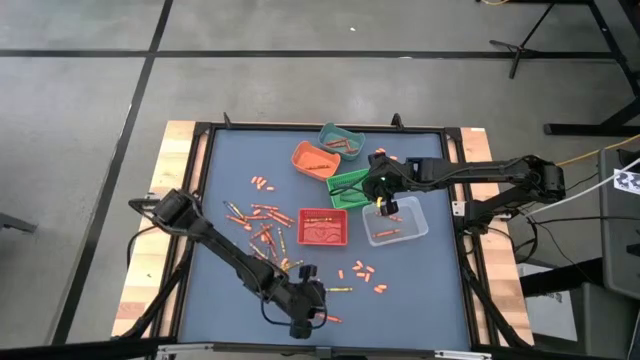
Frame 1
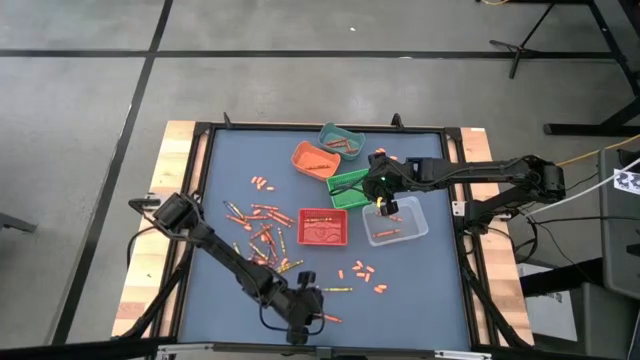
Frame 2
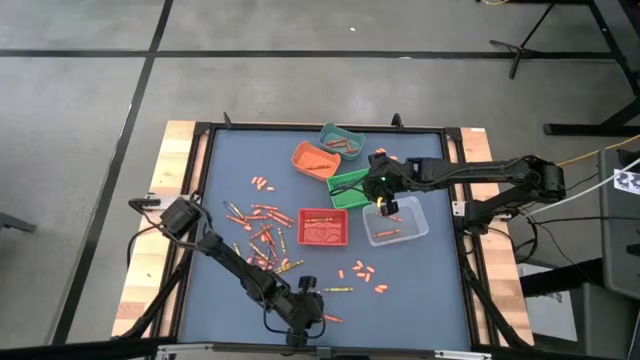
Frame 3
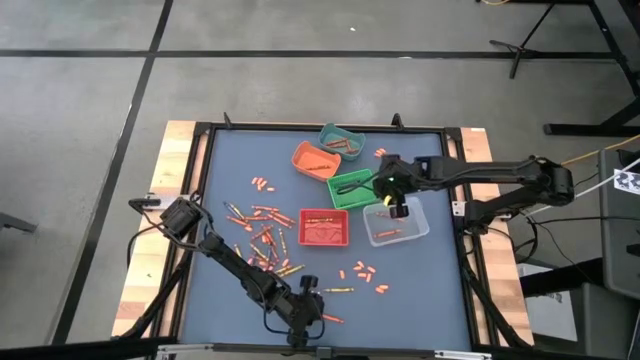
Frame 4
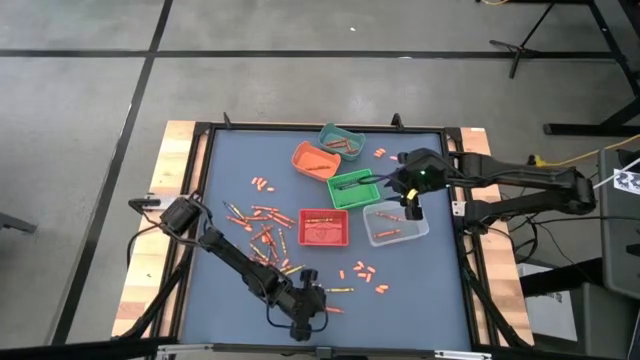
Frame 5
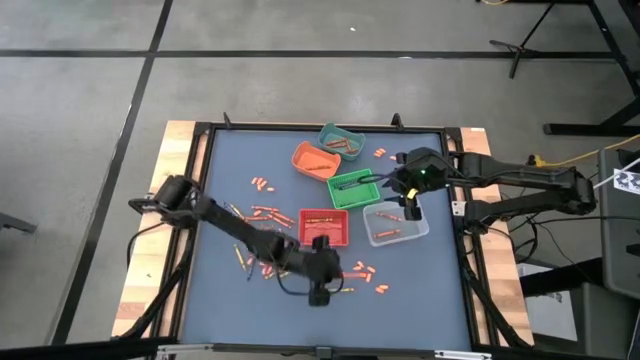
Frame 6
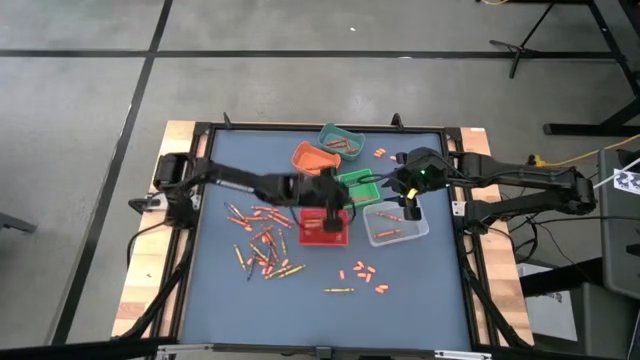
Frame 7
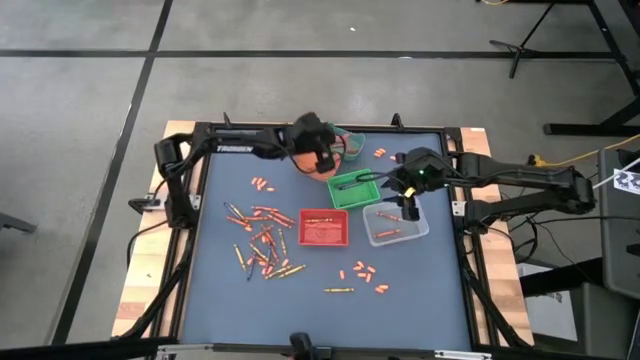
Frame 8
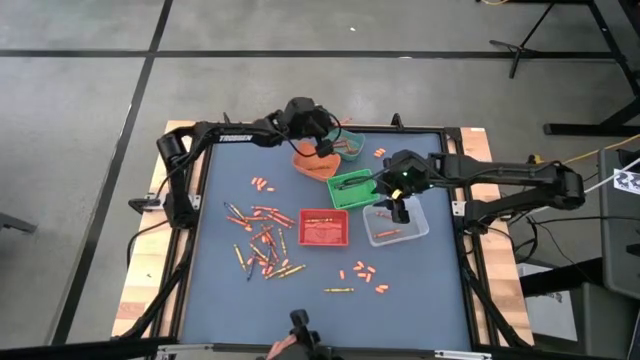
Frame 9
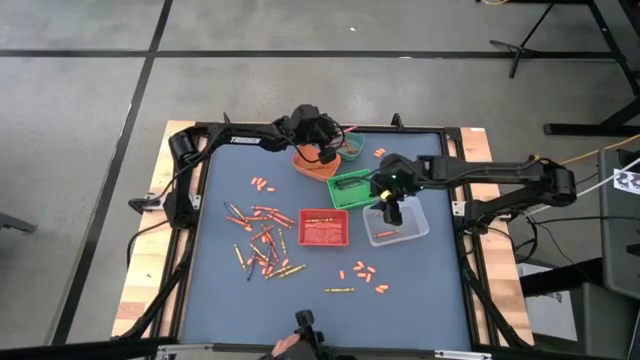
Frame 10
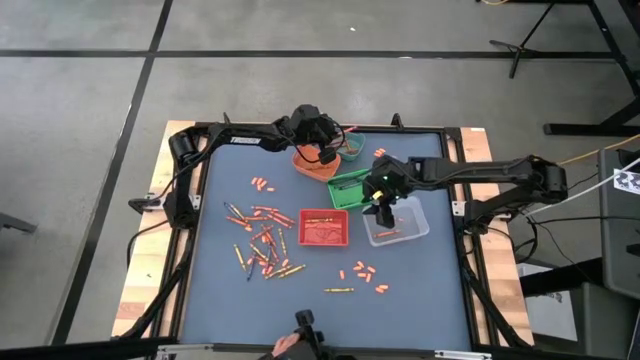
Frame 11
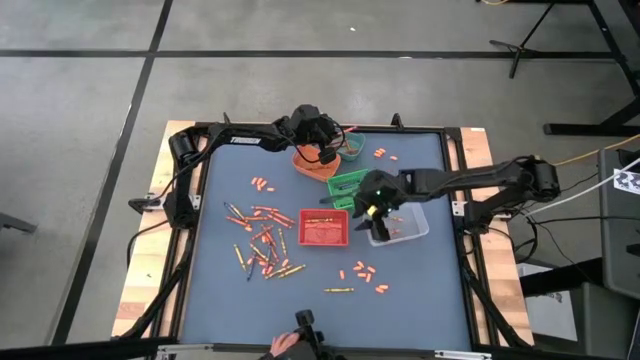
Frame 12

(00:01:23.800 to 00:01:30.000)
Task: Sort crayons
Put the red orange crayon into the blue bin

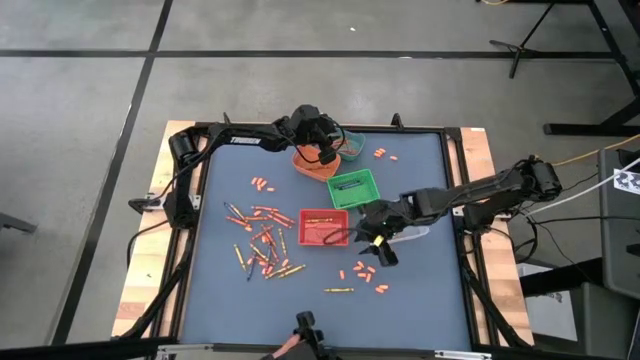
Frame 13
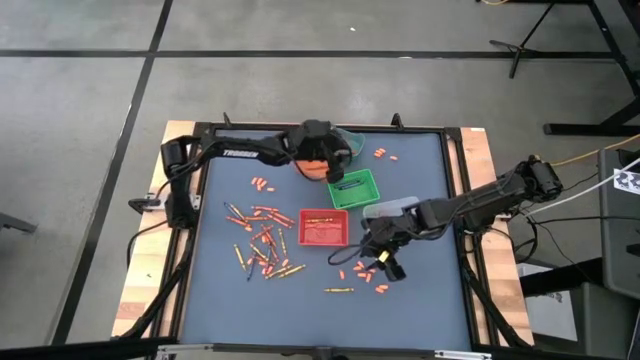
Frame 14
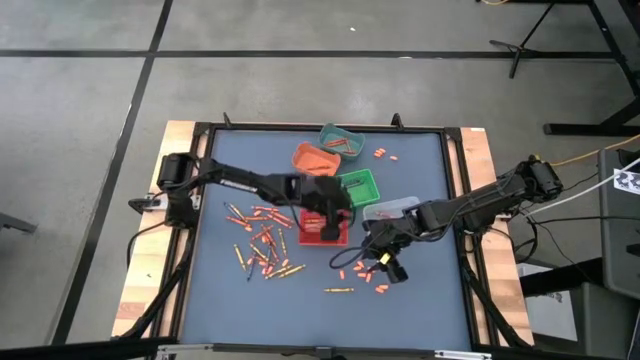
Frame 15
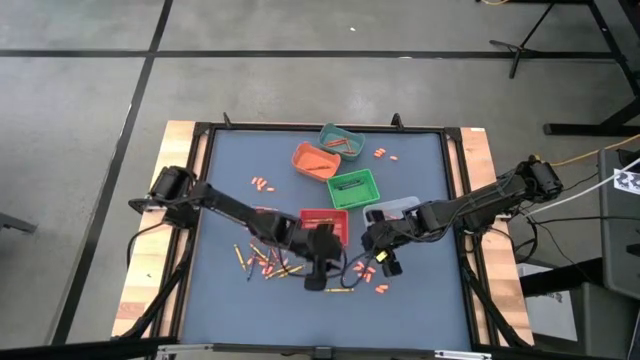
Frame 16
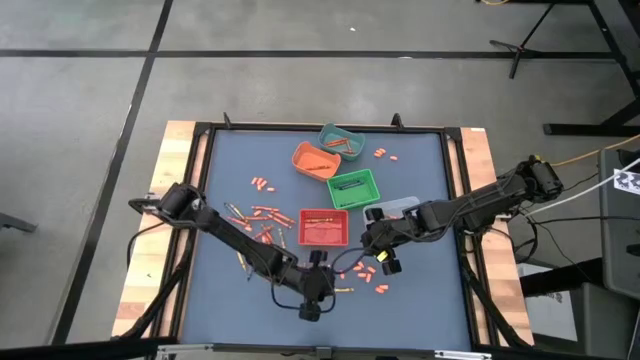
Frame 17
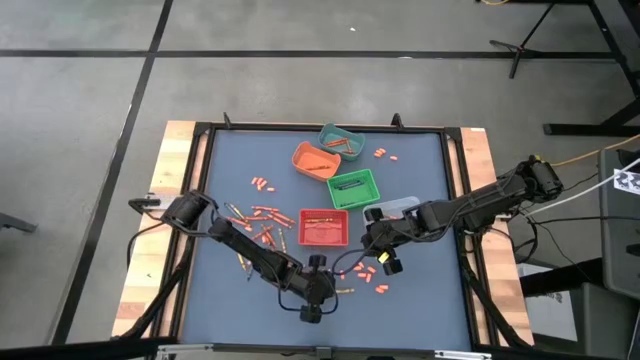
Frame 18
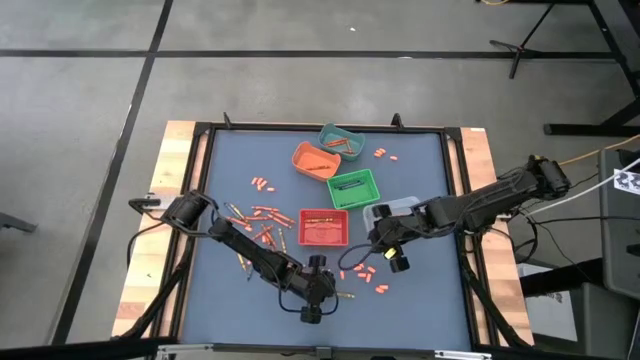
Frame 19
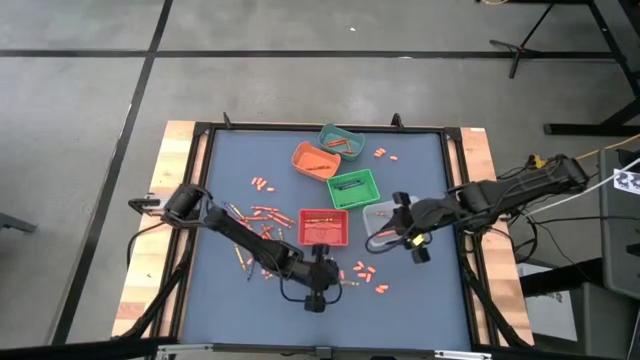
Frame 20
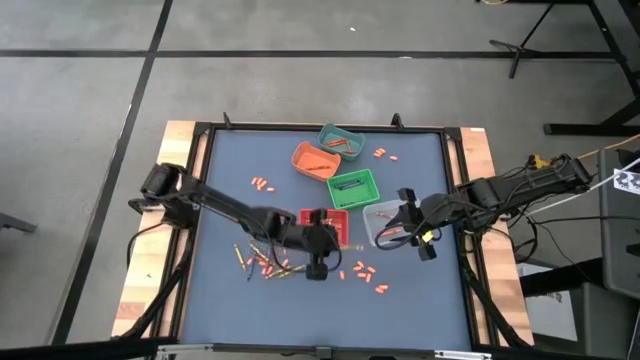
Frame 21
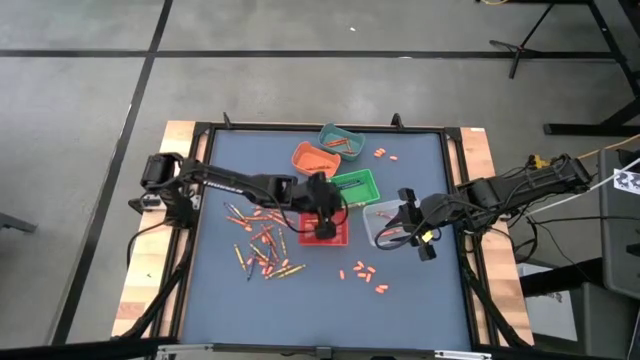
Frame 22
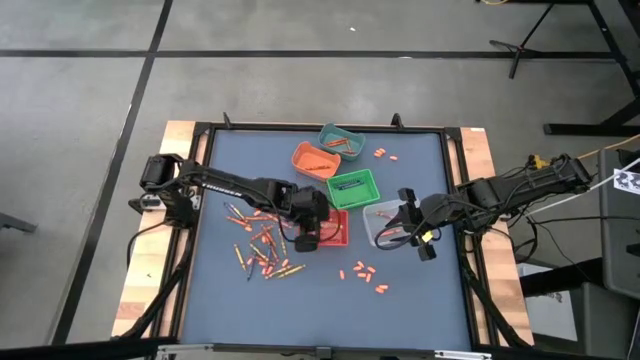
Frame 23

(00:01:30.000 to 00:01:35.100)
Put the yellow crayon into the red bin

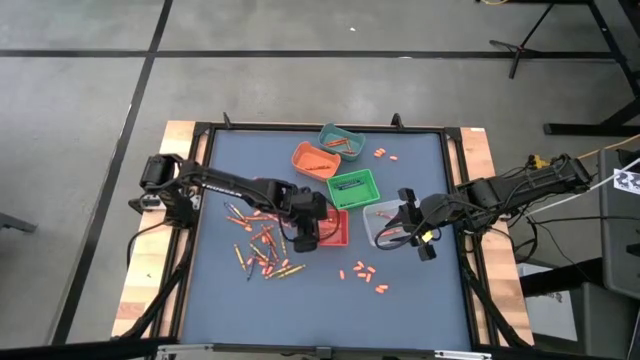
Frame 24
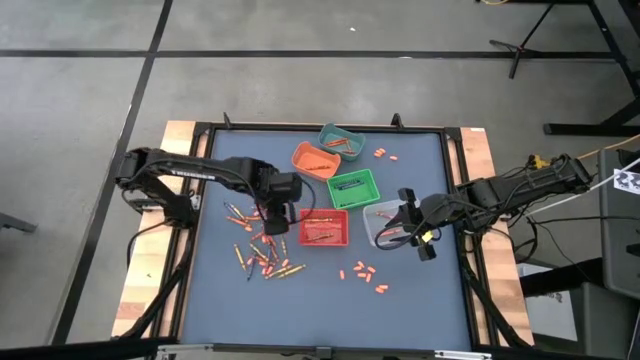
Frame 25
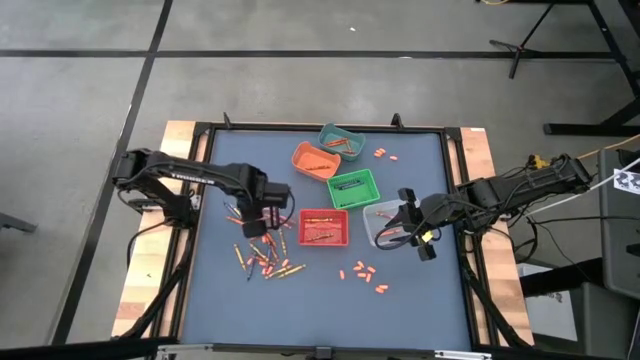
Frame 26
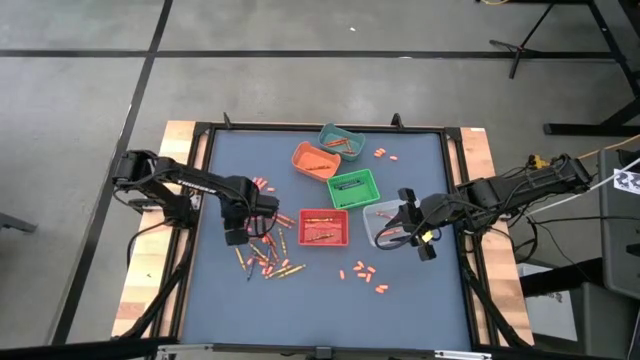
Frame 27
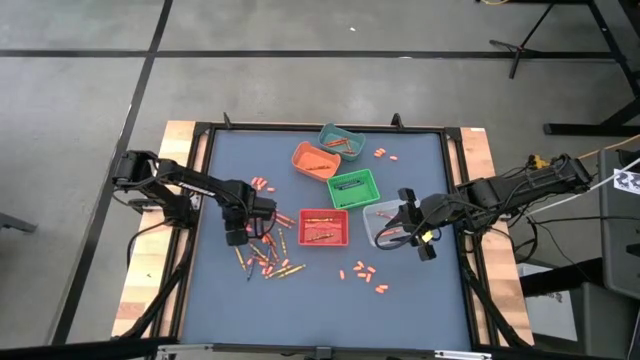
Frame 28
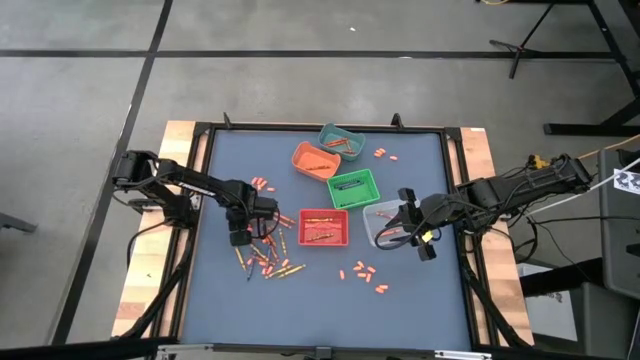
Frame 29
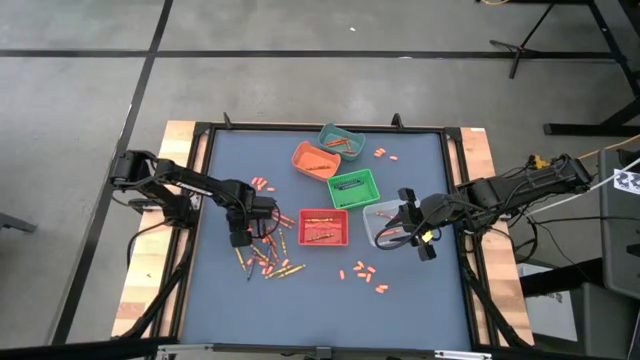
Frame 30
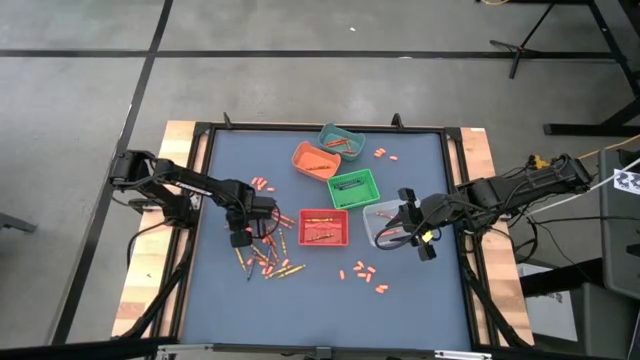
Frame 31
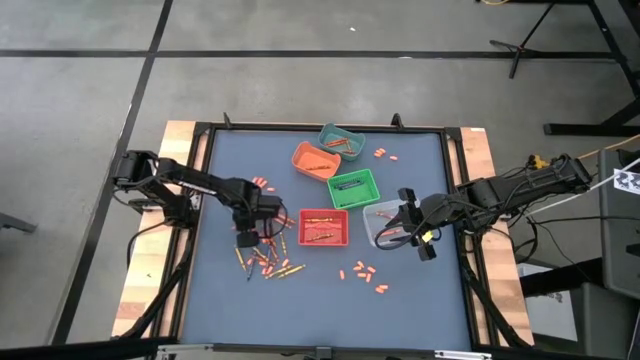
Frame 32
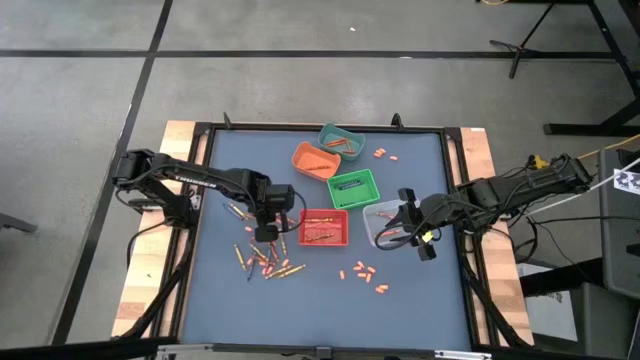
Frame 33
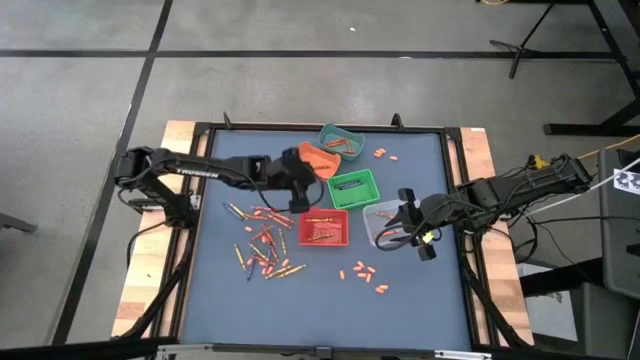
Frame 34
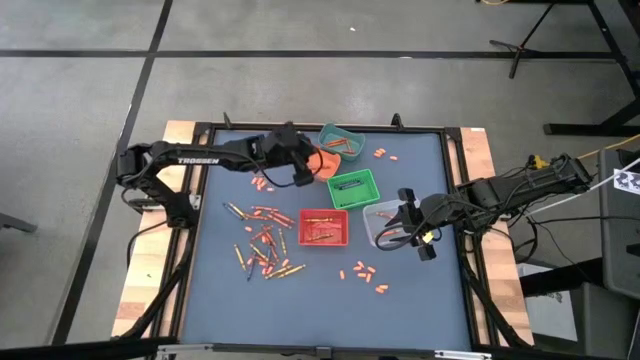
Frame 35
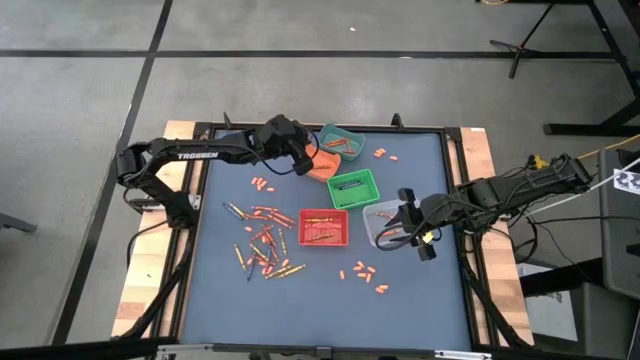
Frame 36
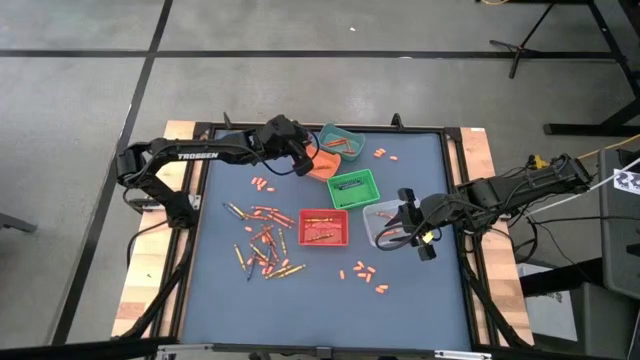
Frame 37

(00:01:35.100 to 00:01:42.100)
Put the orange crayon into the orange bin

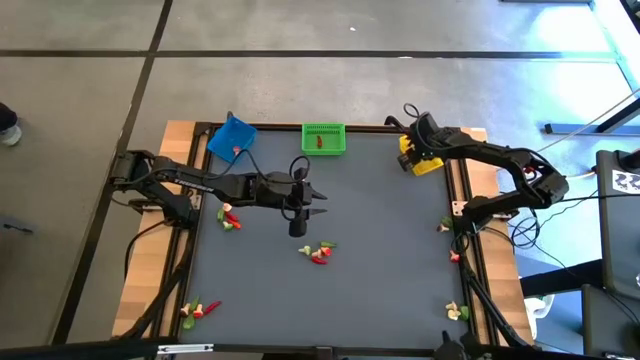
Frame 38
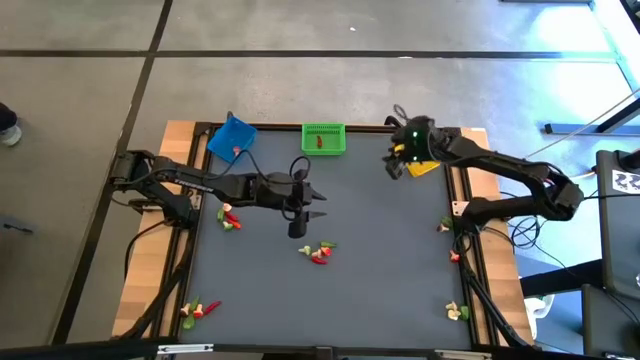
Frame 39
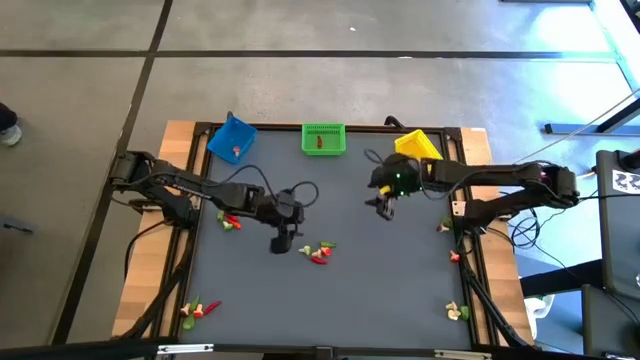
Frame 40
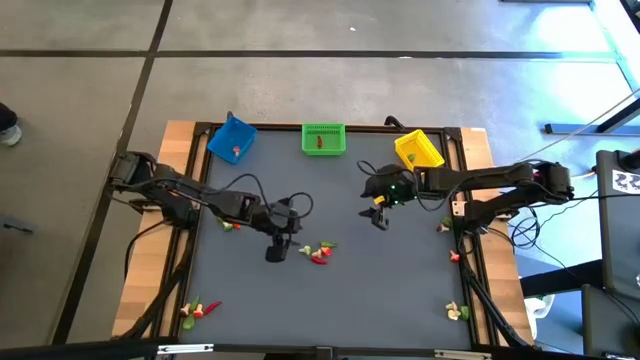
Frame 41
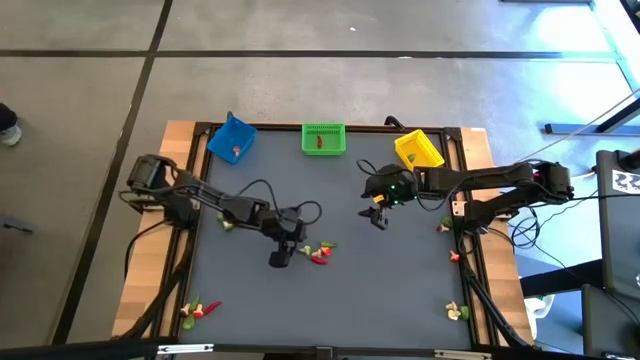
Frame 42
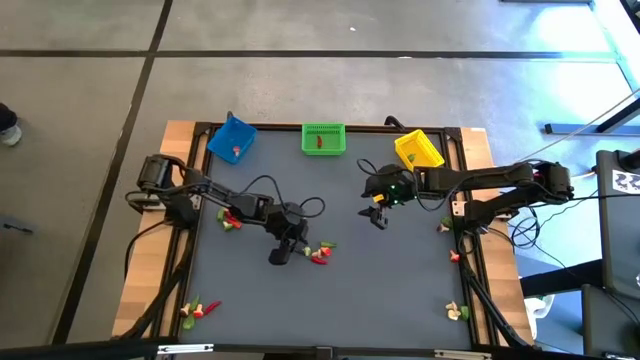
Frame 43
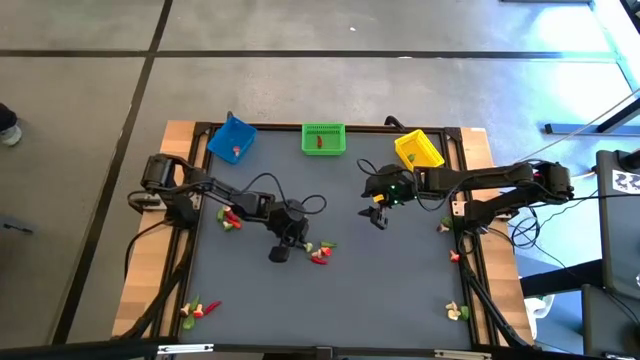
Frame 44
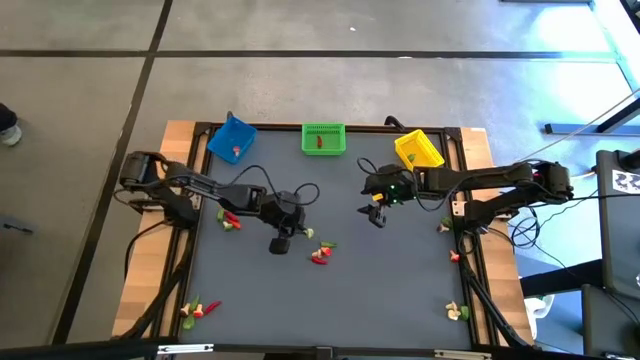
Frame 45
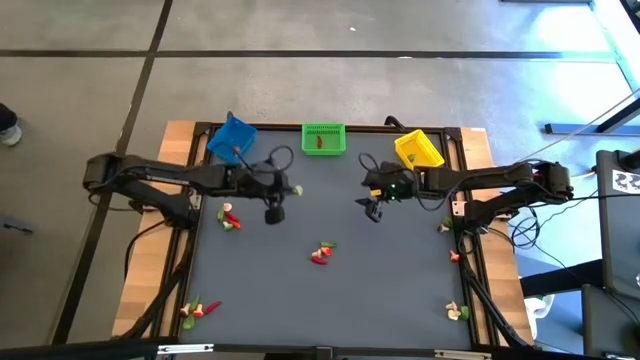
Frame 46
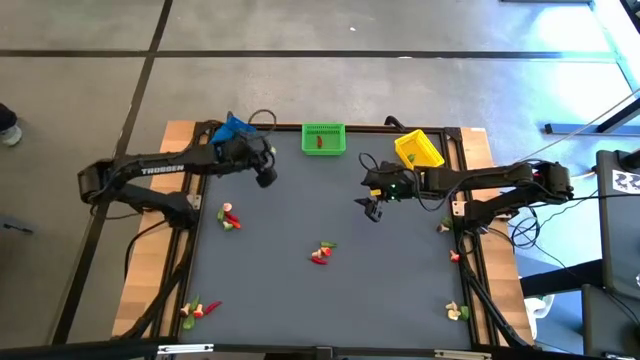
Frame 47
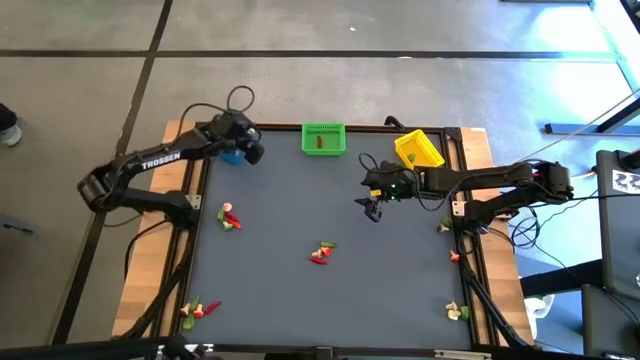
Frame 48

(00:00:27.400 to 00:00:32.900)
Task: Sort produce into baskets
Put the green mushroom into the blue bin
